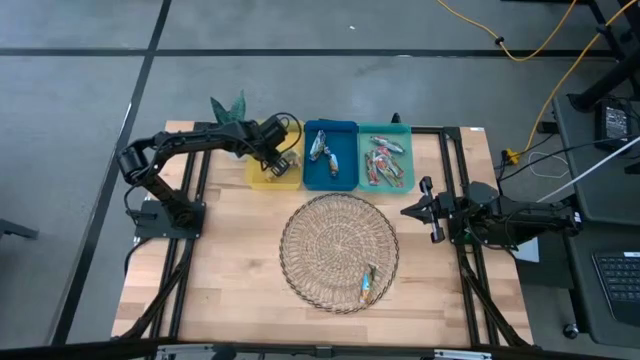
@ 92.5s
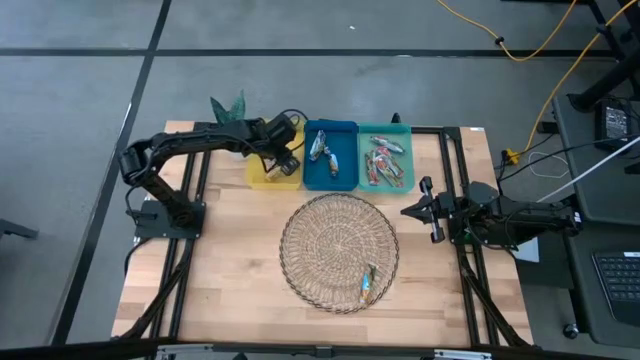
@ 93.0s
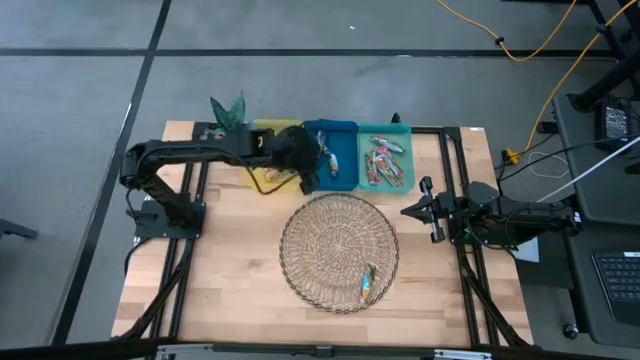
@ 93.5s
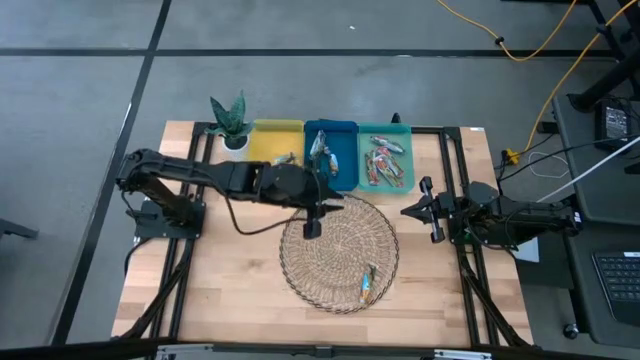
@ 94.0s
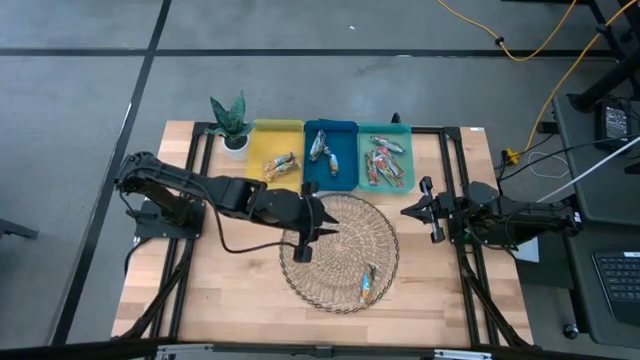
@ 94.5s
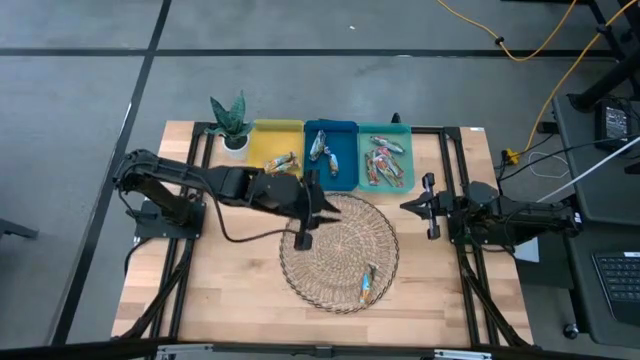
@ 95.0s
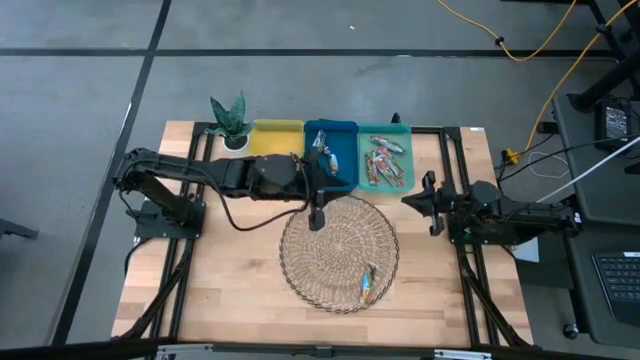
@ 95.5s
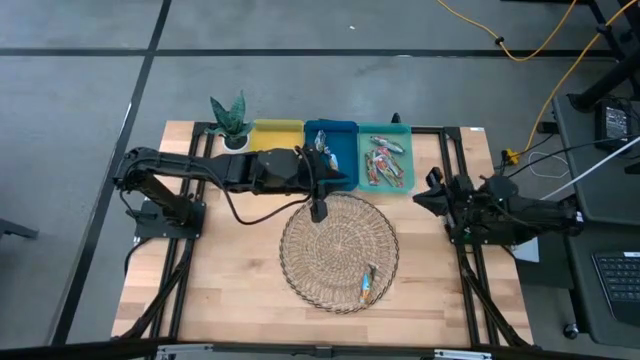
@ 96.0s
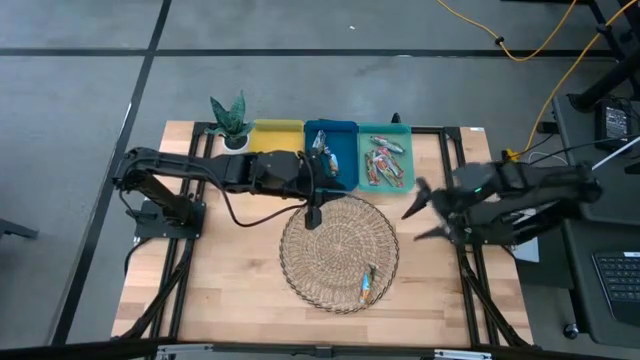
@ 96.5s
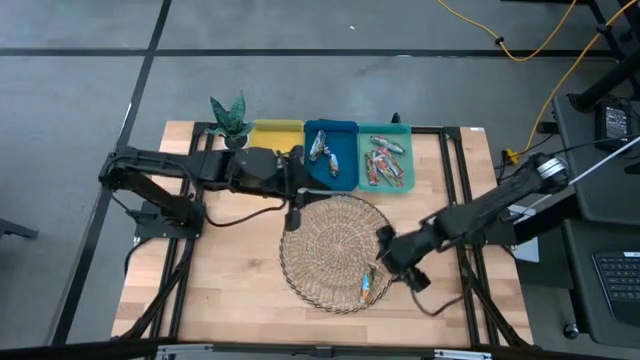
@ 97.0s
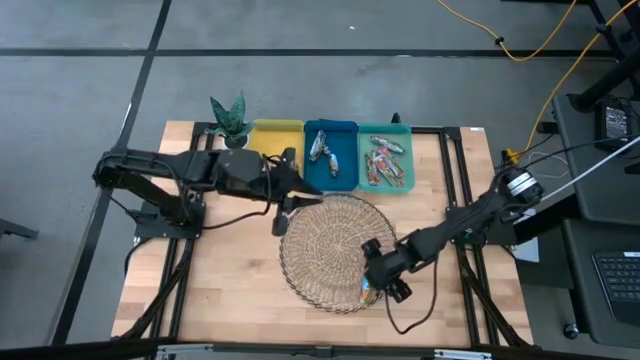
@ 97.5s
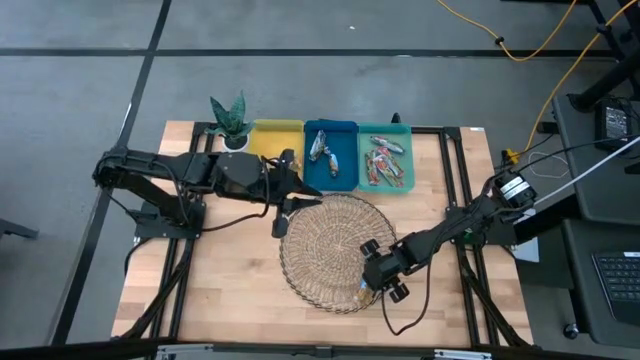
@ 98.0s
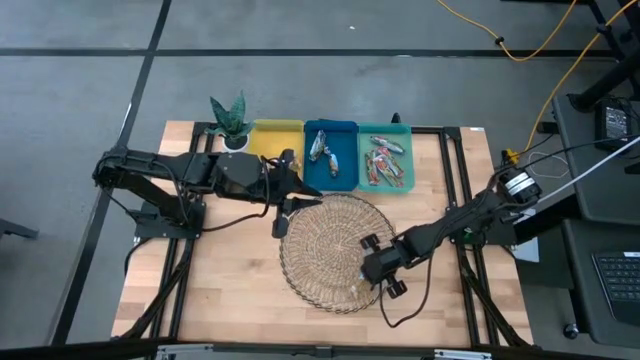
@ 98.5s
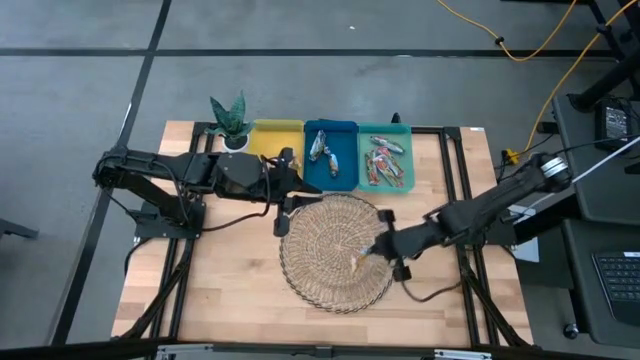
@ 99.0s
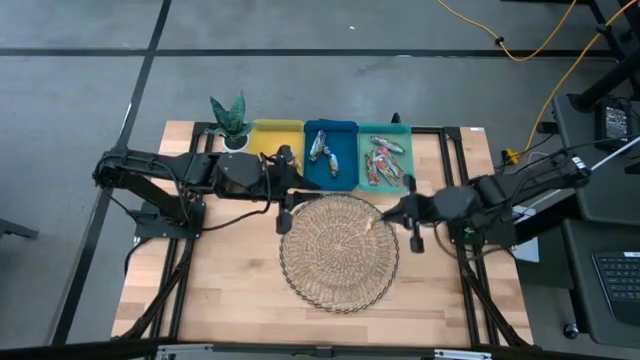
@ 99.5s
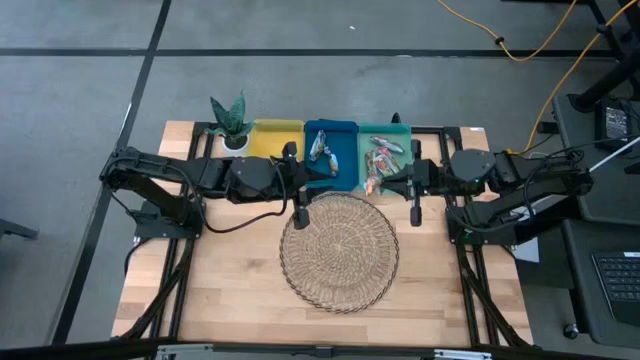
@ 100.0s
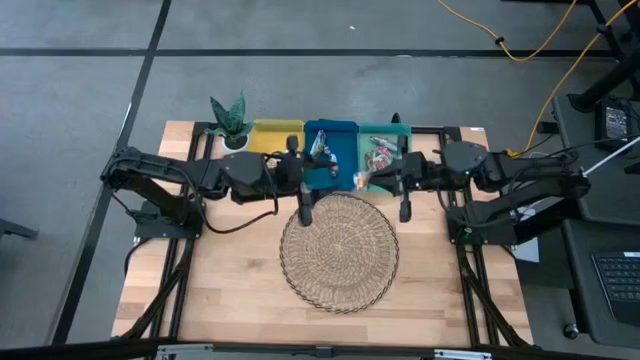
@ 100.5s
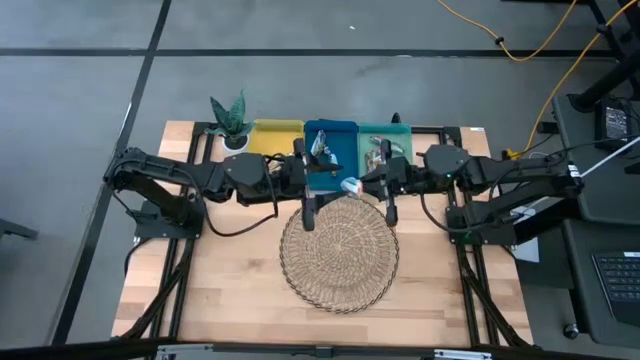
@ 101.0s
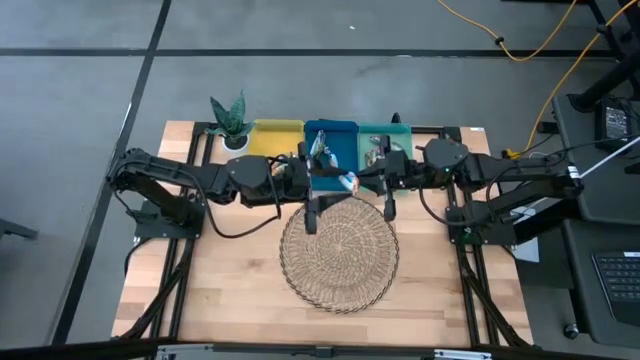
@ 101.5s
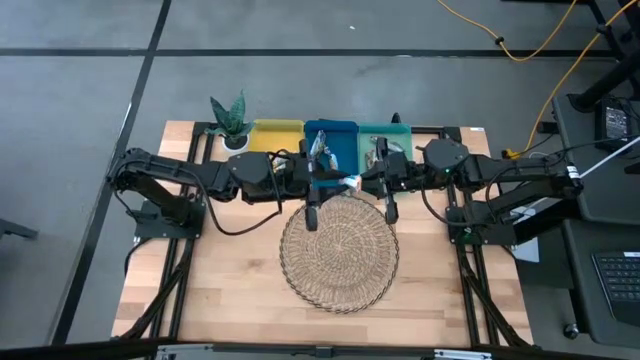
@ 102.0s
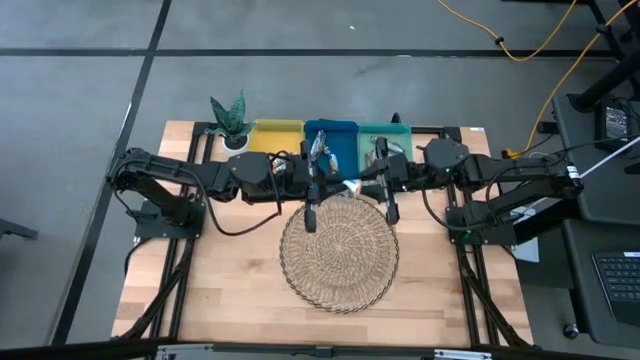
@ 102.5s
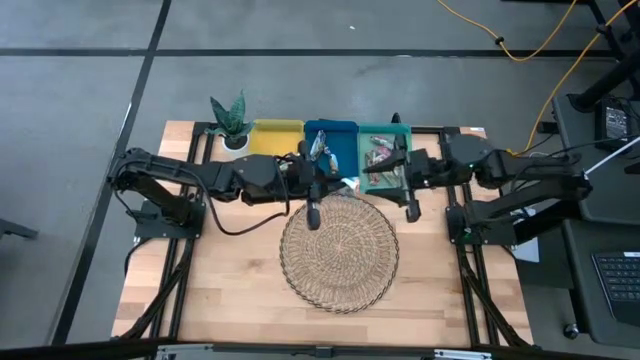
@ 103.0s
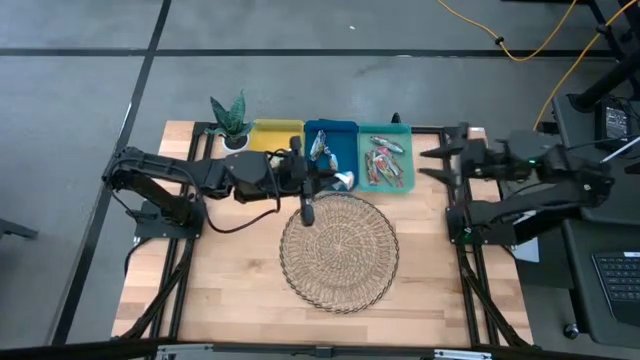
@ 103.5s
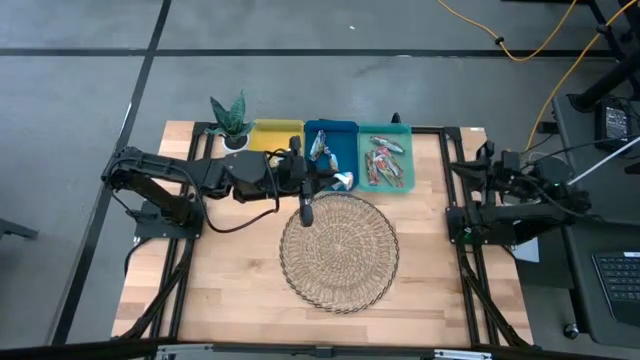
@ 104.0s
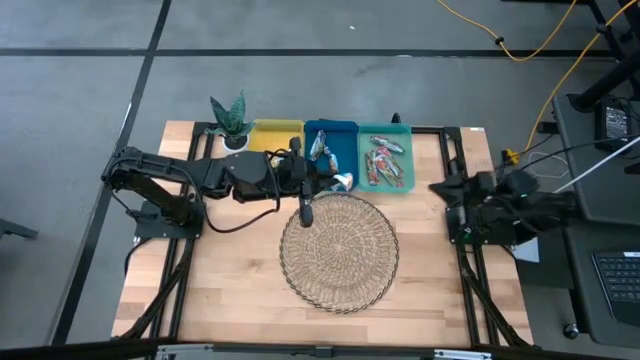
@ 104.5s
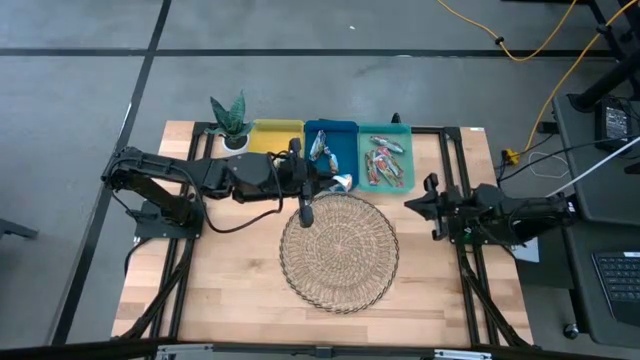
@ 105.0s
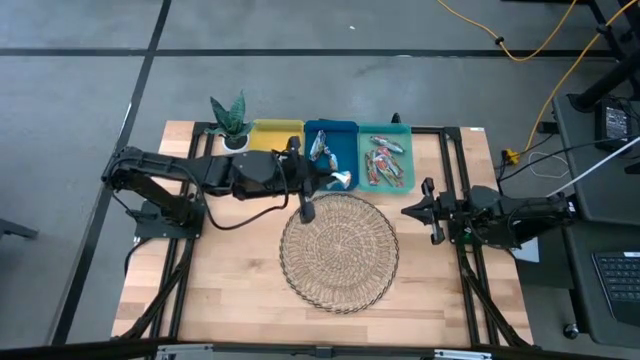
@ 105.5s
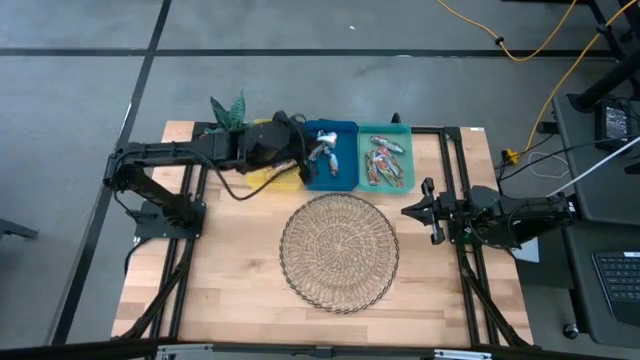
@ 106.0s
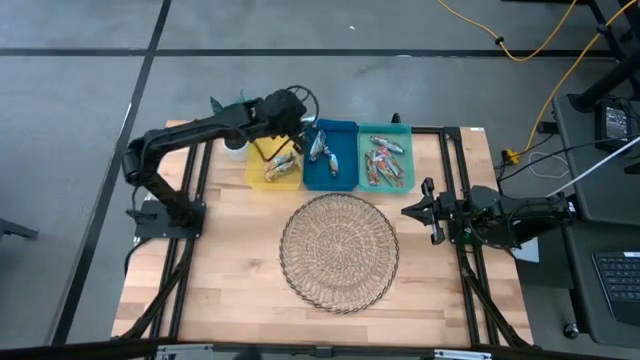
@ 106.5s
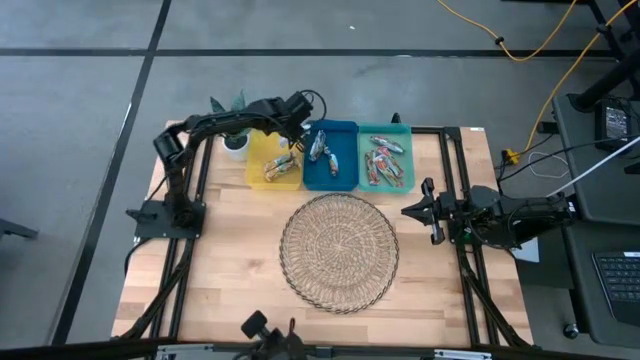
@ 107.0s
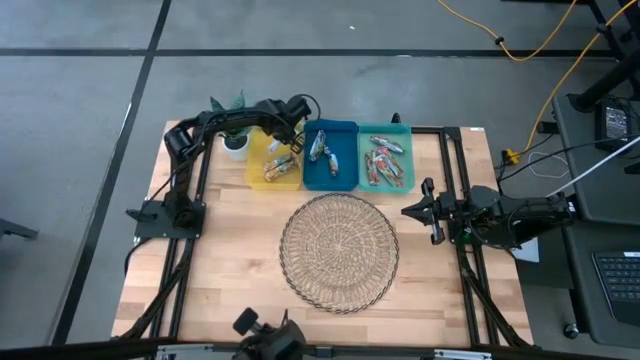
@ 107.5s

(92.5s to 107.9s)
Task: Pick and place Granola Bars by type
Put the yellow granola bar into the yellow bin

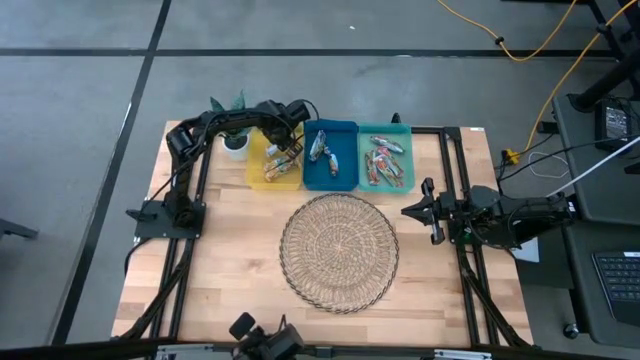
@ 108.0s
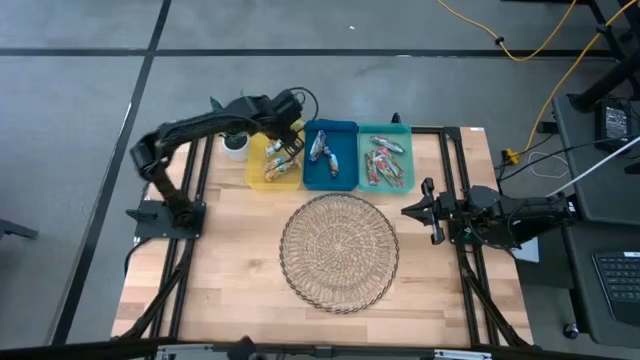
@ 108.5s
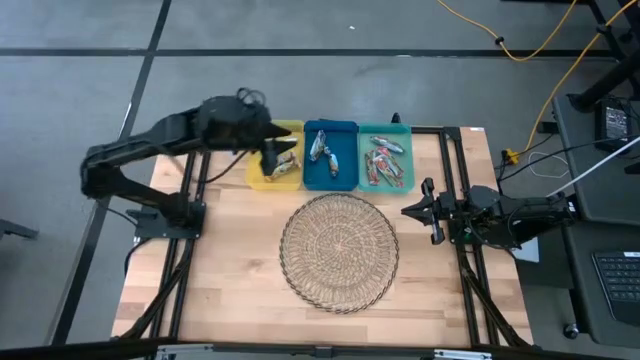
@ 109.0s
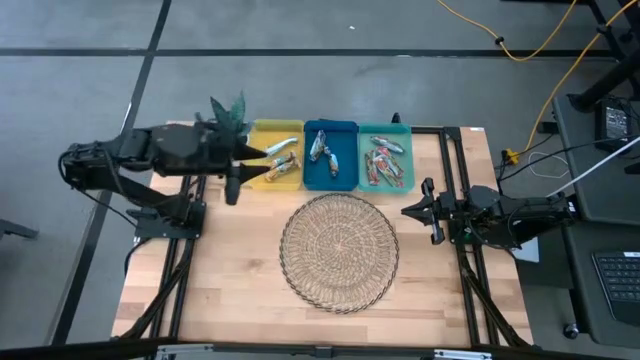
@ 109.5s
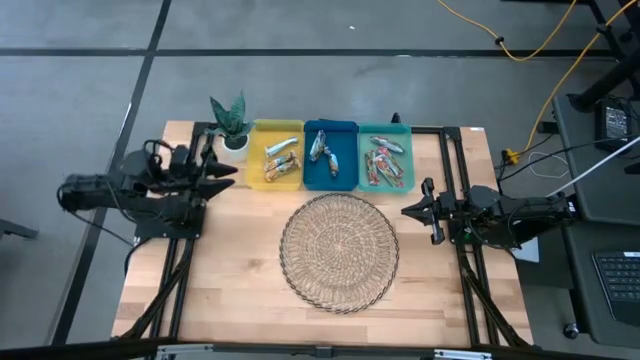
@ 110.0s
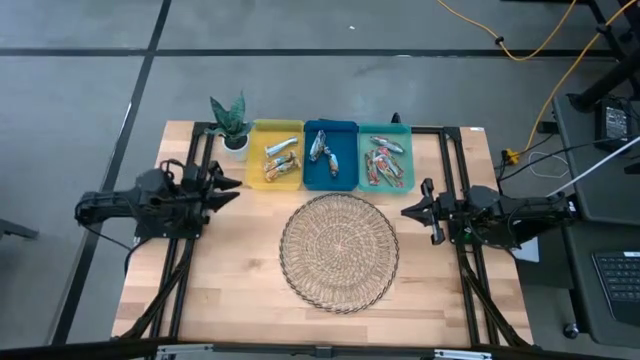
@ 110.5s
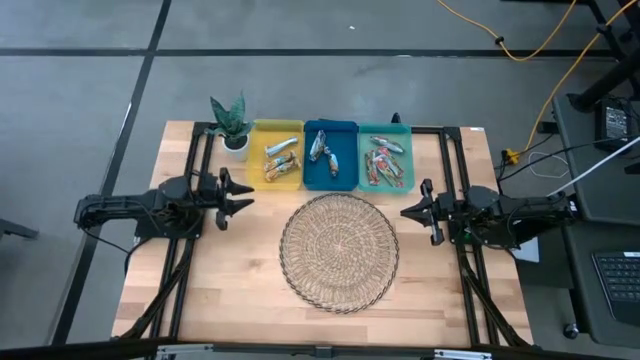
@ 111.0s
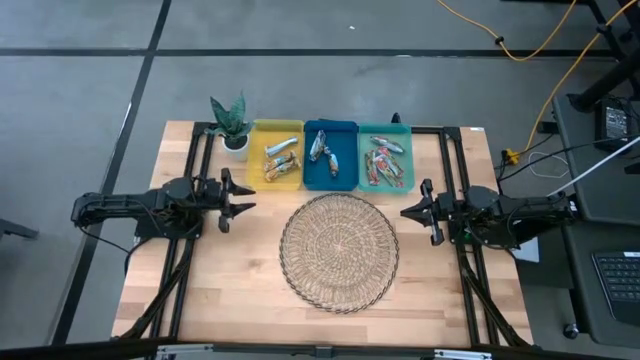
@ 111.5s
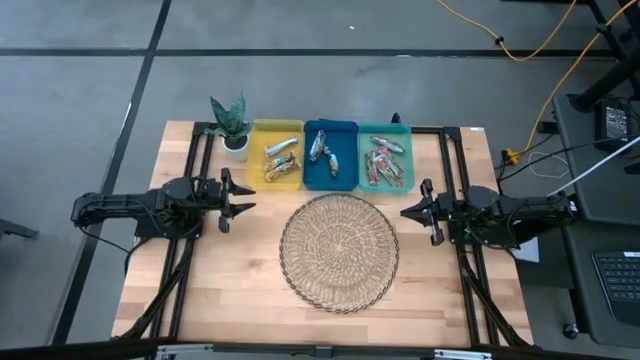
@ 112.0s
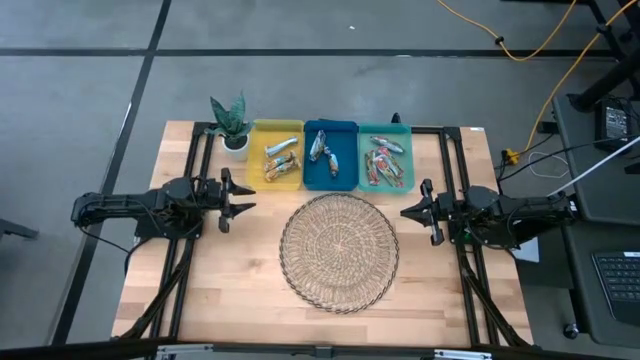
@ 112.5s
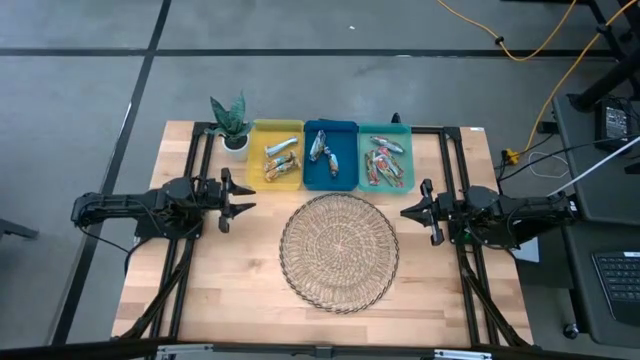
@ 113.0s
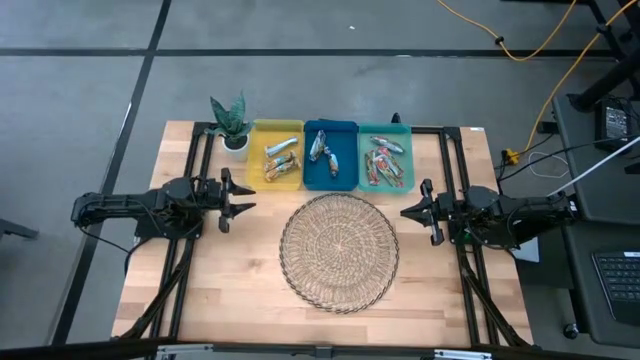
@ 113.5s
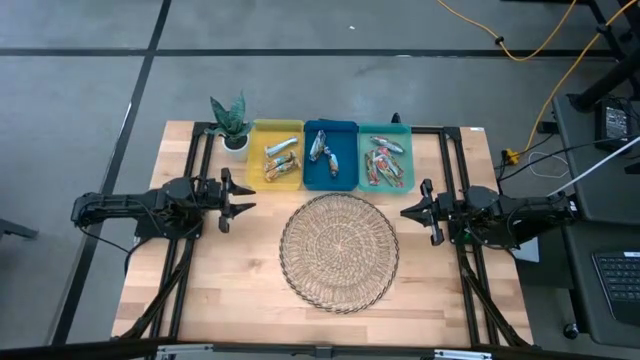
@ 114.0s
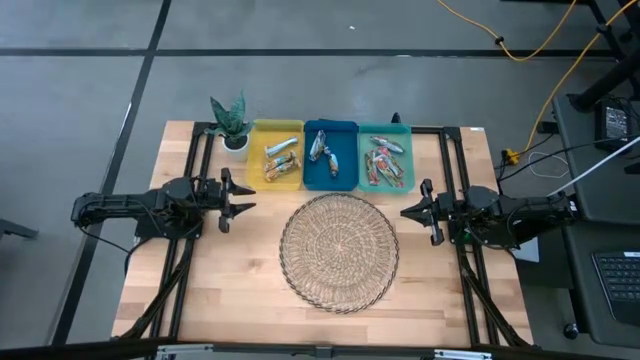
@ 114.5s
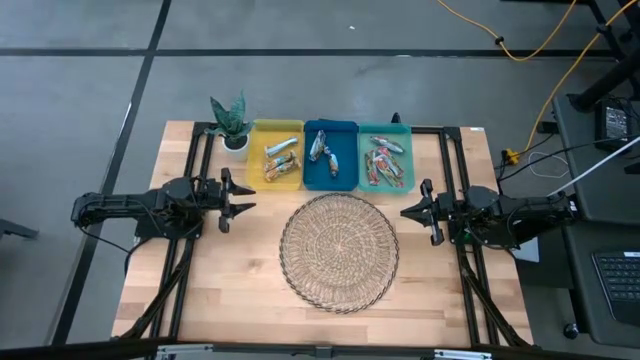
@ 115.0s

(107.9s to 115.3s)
Return to Home Position
